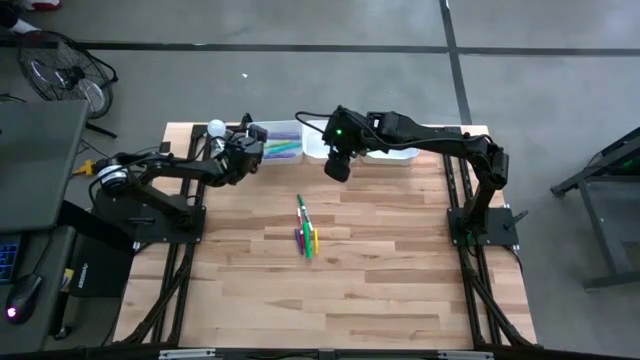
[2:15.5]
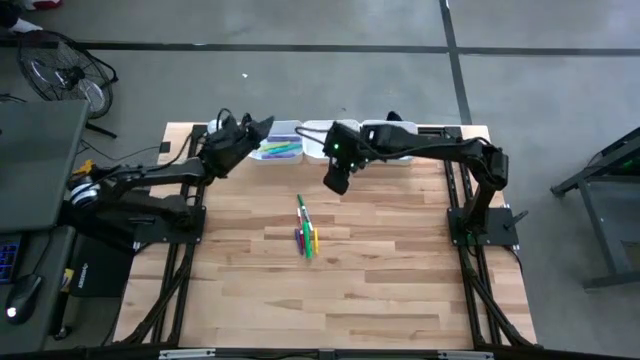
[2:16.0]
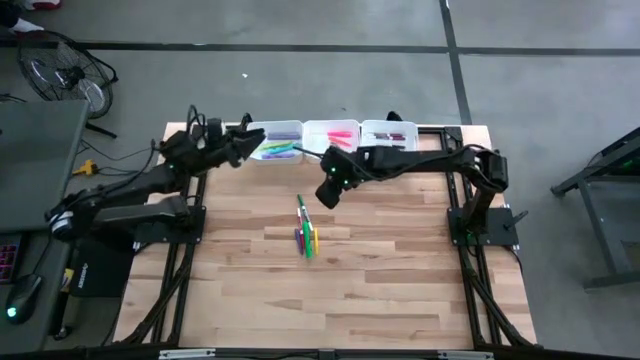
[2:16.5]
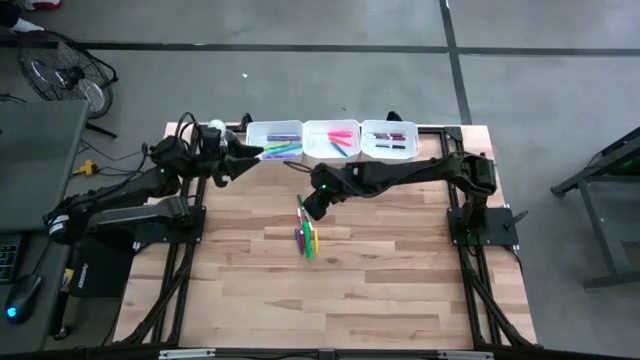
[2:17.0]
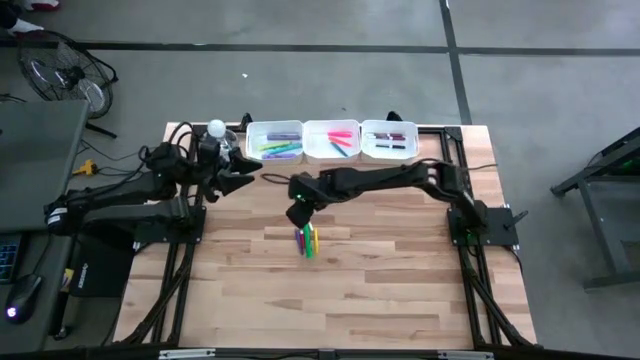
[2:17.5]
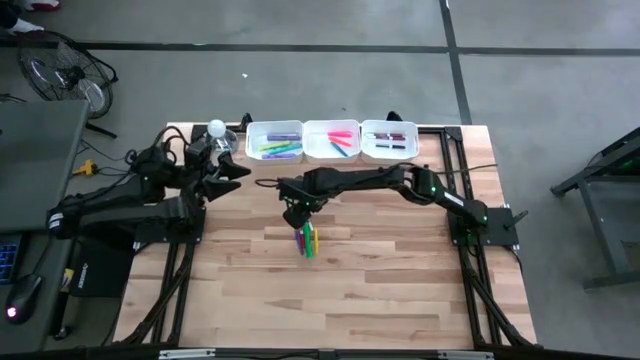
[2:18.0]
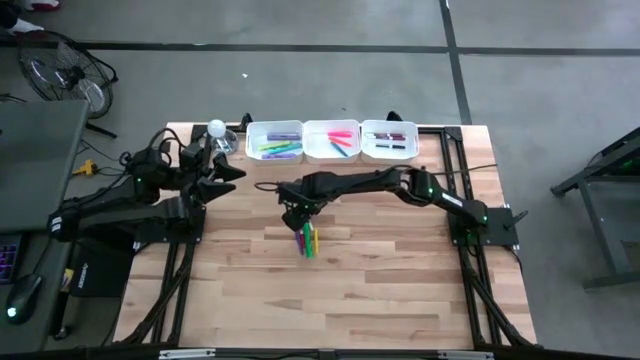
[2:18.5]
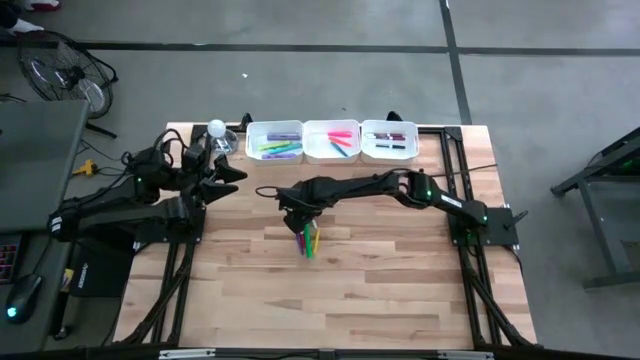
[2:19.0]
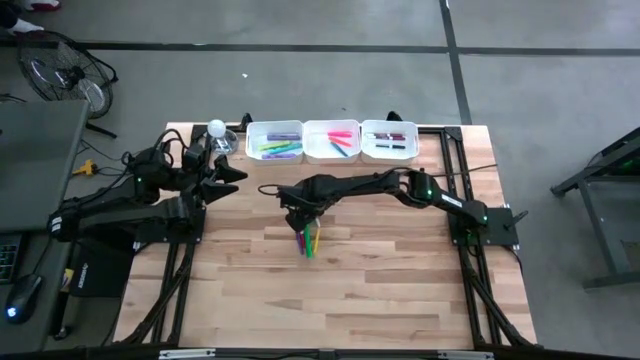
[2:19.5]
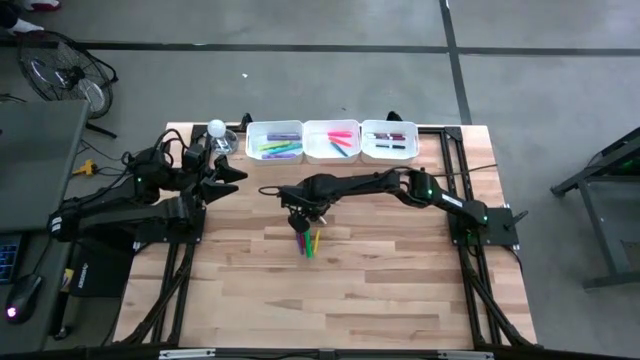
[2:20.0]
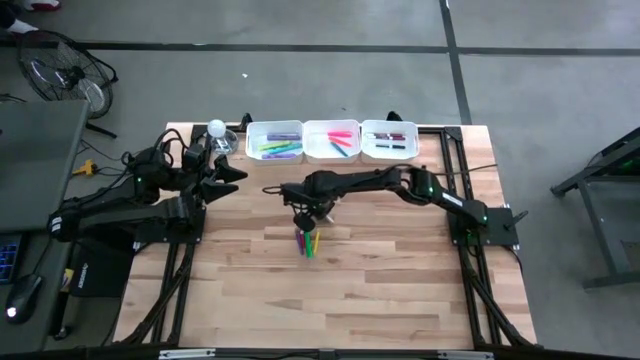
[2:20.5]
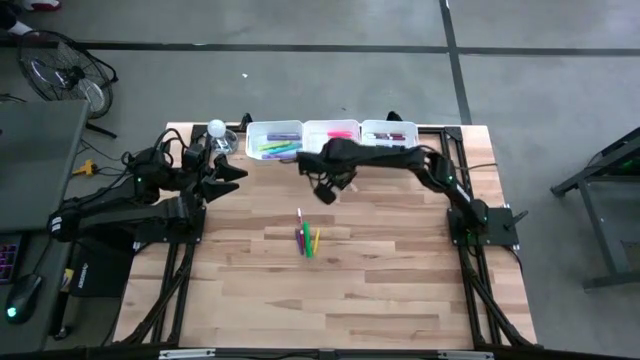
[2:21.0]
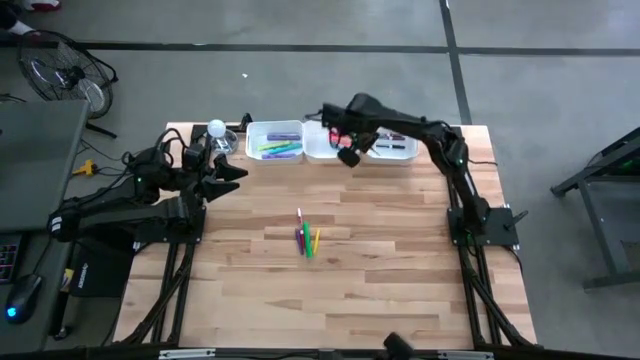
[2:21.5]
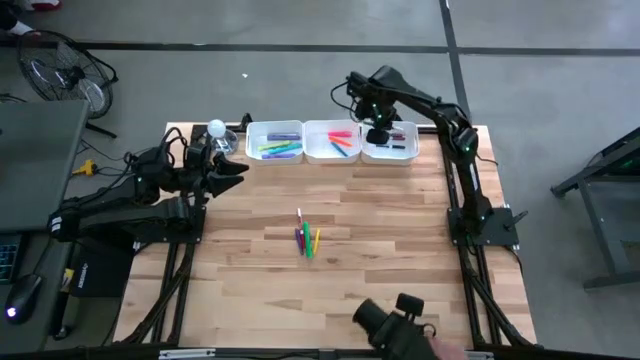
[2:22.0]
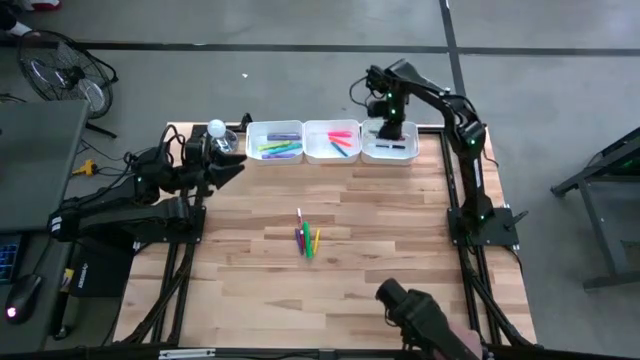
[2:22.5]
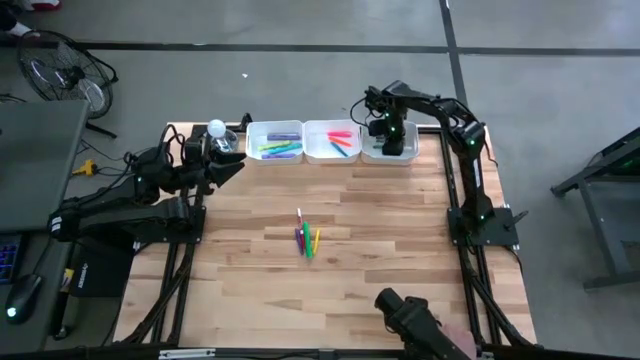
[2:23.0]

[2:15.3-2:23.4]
Task: Pick & Place Markers
Put the green marker pen into the right white bin

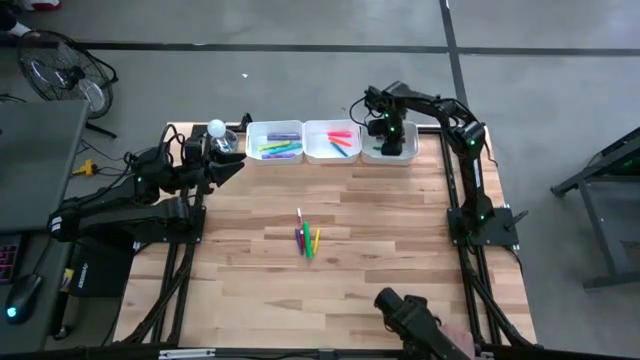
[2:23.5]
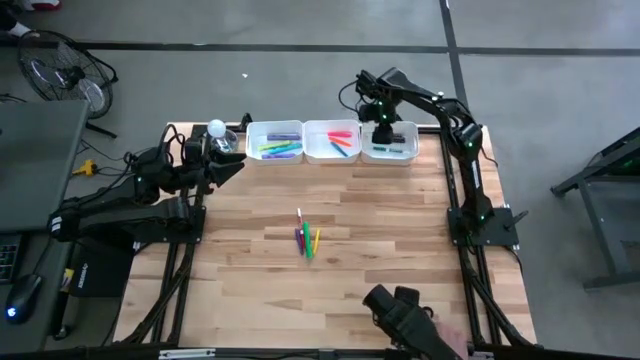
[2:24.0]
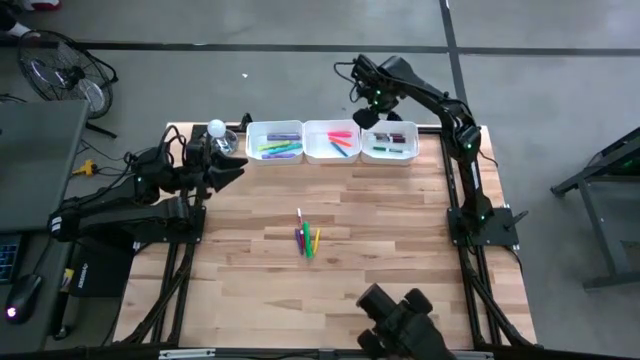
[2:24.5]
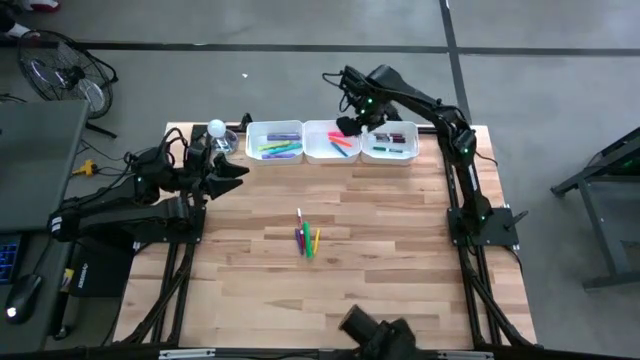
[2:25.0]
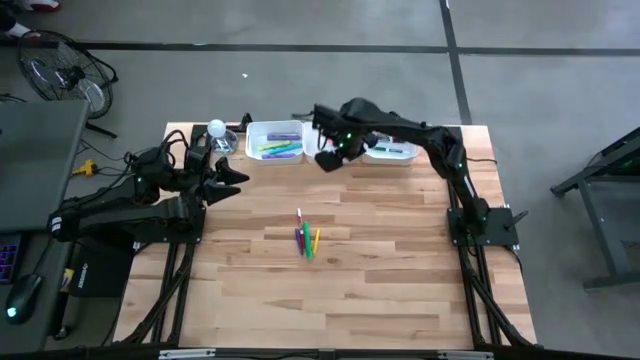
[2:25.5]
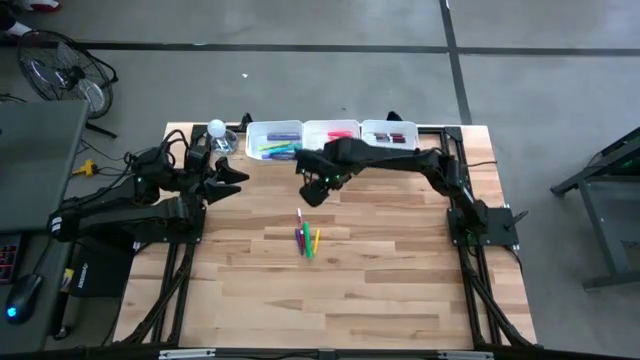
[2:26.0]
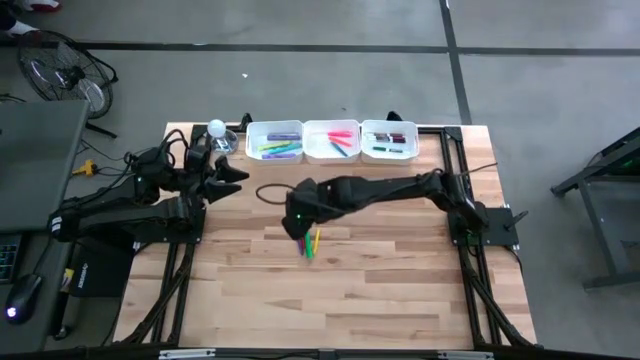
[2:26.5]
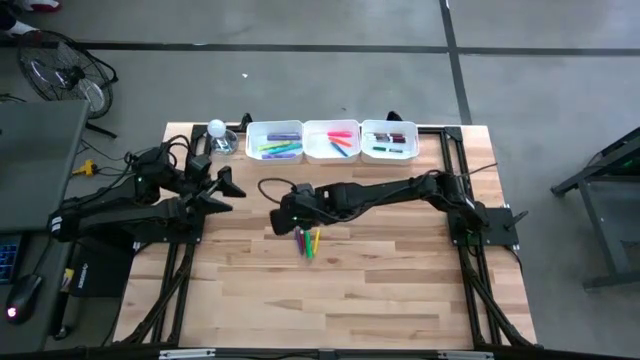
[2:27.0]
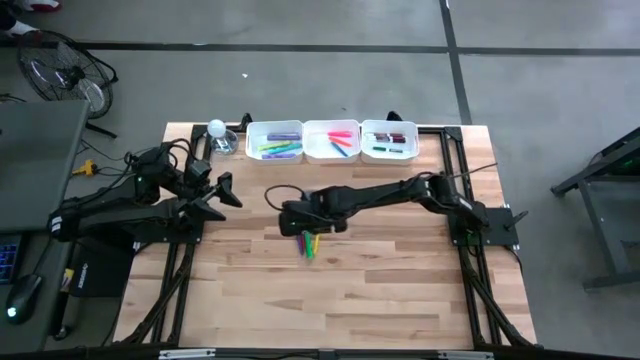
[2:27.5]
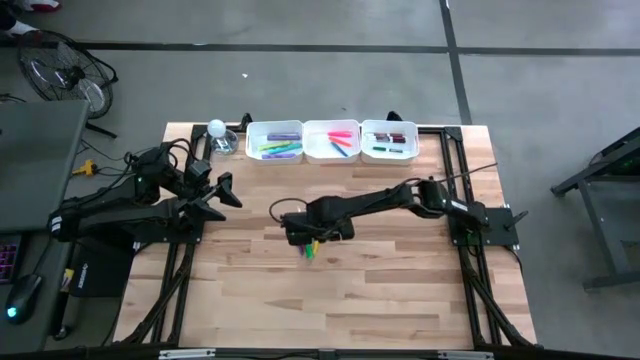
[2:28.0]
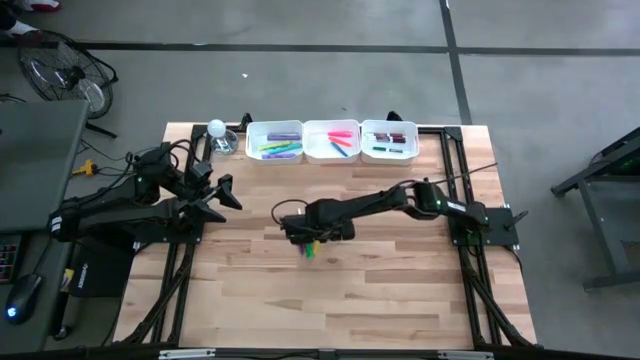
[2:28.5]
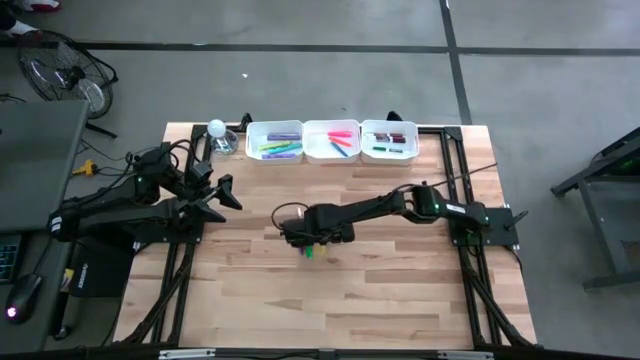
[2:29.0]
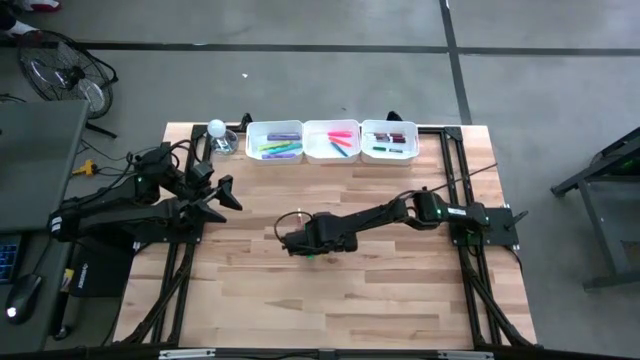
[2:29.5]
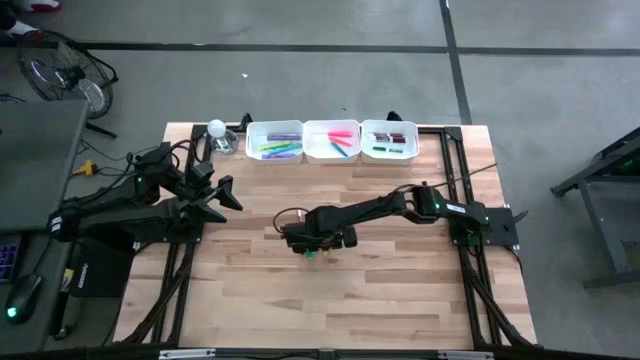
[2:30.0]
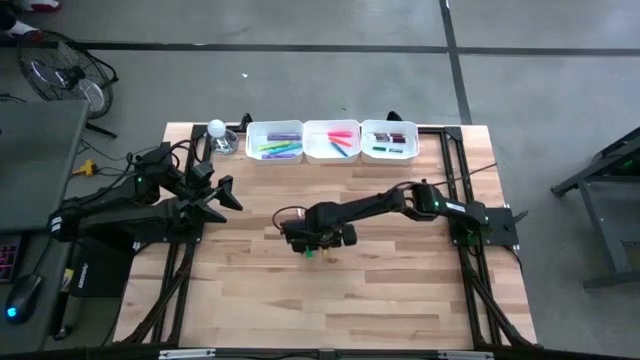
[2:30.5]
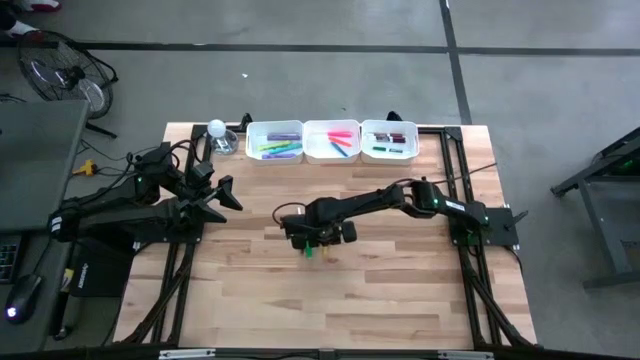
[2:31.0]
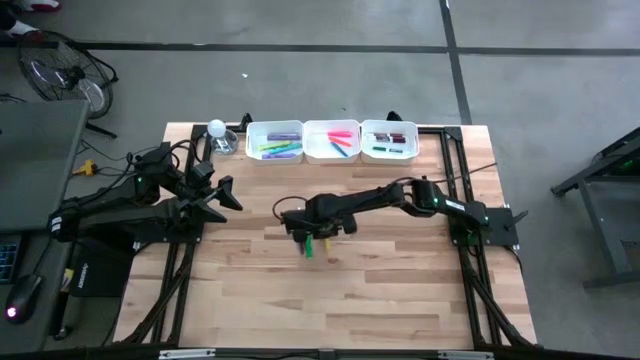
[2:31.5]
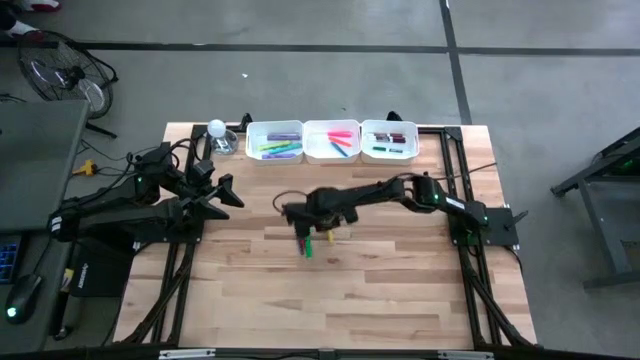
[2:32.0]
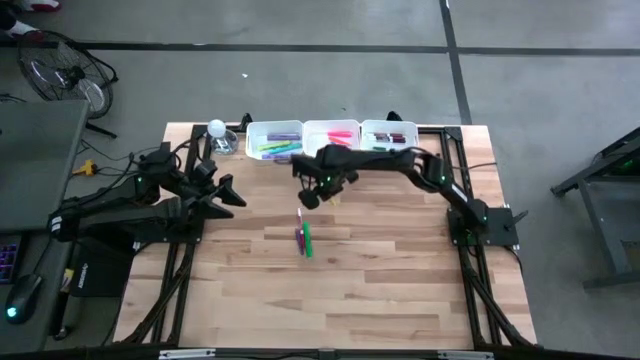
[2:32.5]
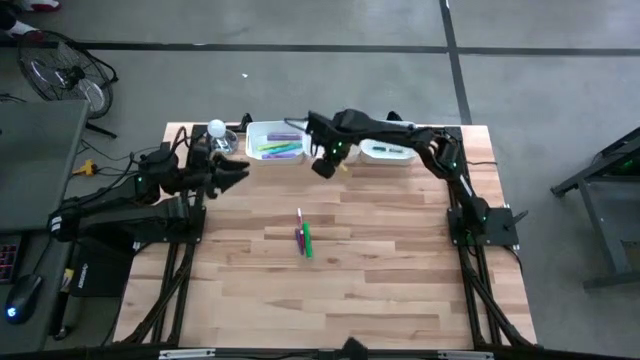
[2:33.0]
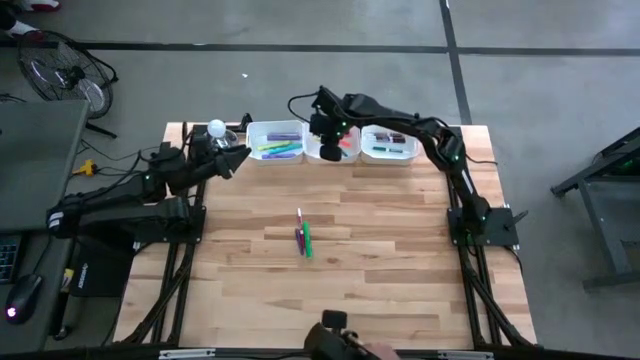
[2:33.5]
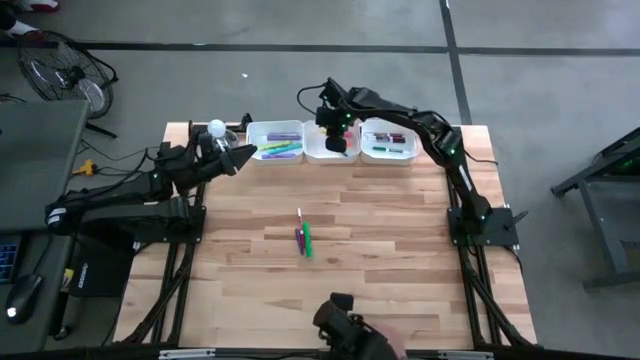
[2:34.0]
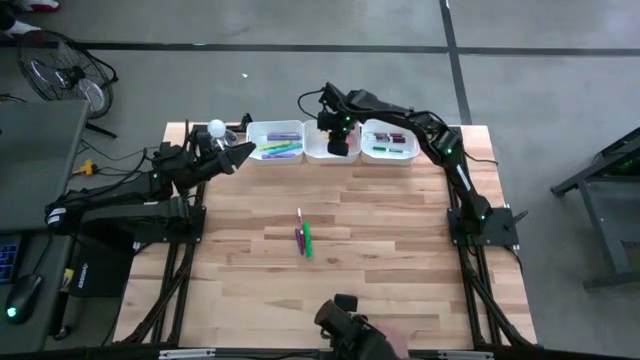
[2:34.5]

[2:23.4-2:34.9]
Put the yellow pen into the middle white bin

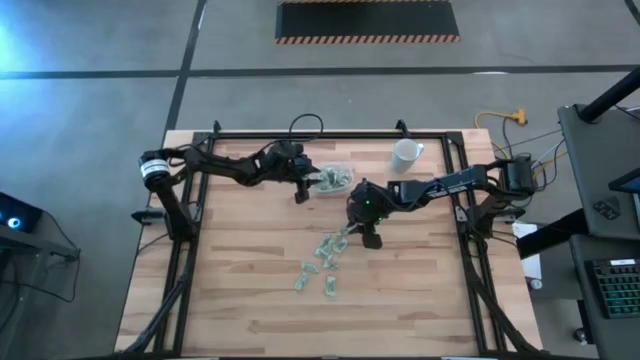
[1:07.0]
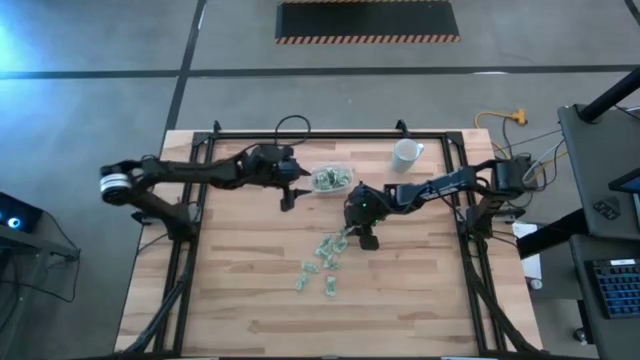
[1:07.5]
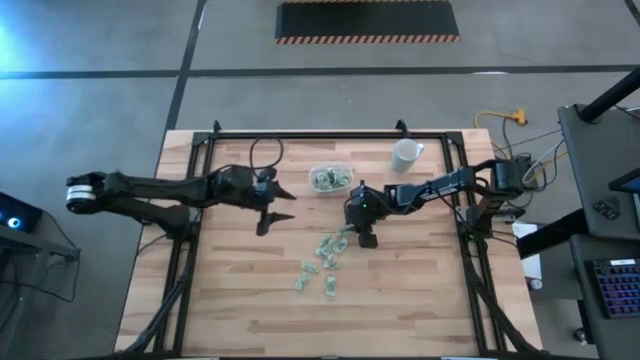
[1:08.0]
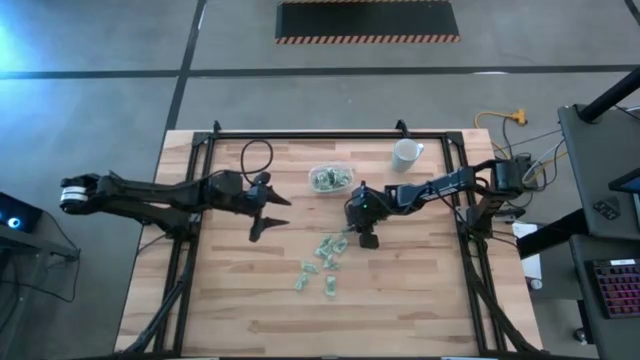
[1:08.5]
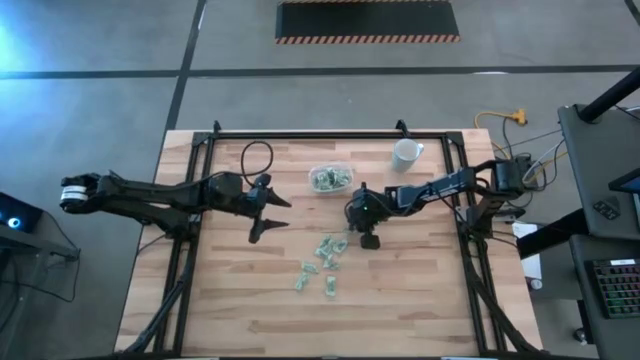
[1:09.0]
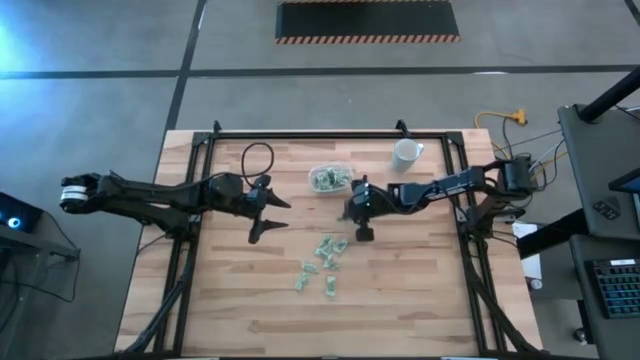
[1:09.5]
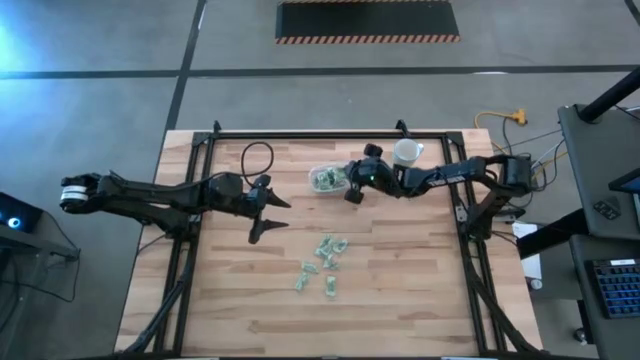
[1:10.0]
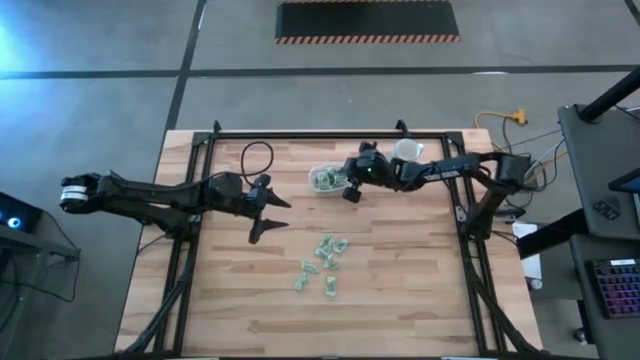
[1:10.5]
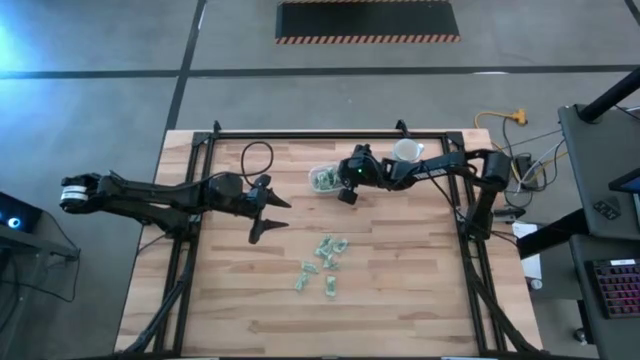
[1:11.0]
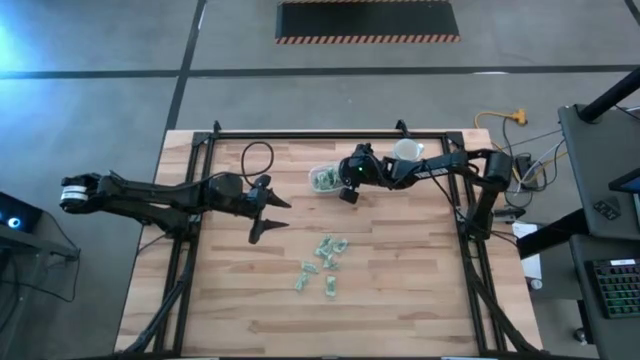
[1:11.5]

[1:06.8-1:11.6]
Task: Pick and place Stevia / Truvia into bins
Put the stevia packet into the transparent container
